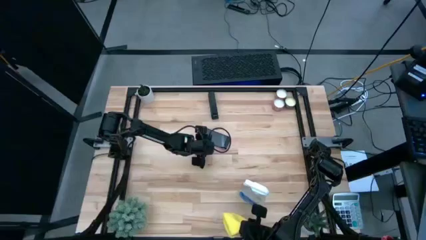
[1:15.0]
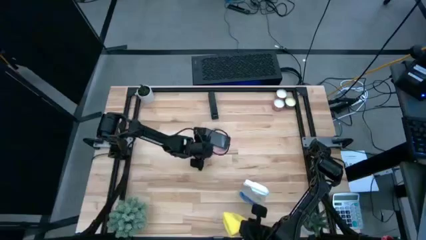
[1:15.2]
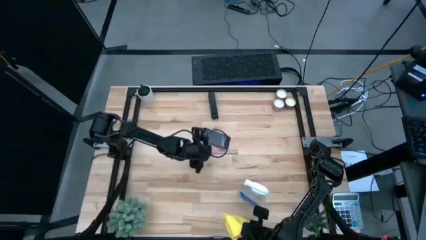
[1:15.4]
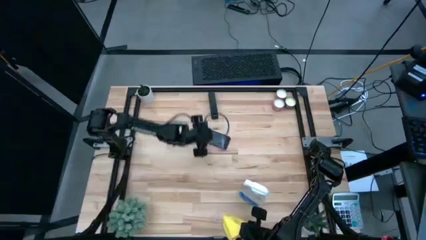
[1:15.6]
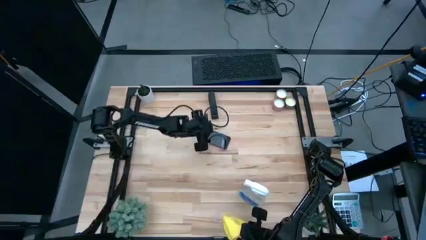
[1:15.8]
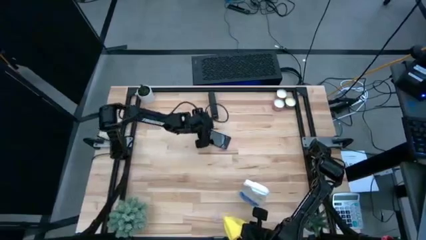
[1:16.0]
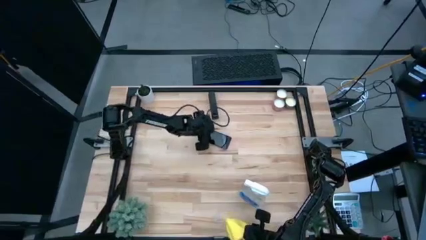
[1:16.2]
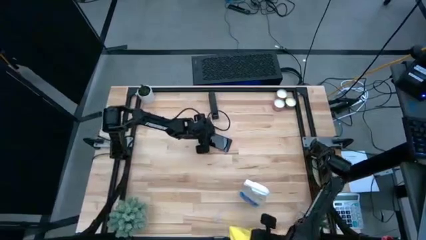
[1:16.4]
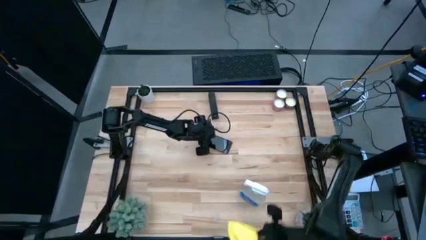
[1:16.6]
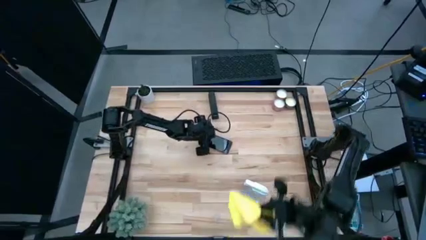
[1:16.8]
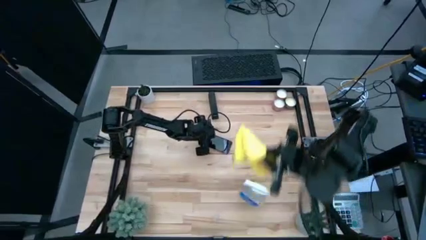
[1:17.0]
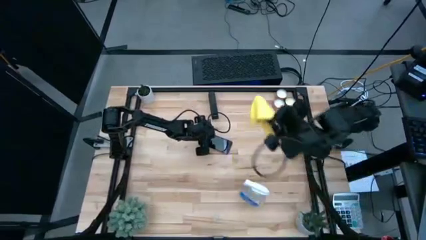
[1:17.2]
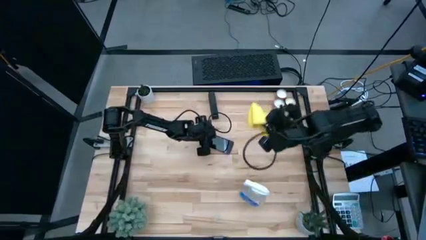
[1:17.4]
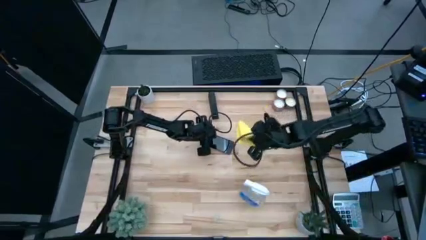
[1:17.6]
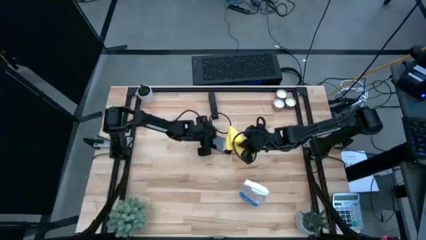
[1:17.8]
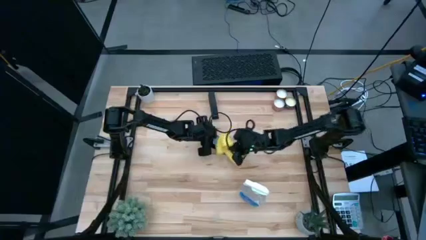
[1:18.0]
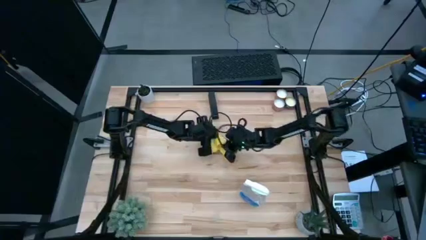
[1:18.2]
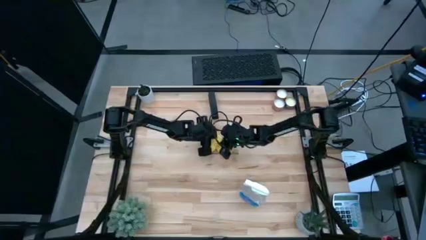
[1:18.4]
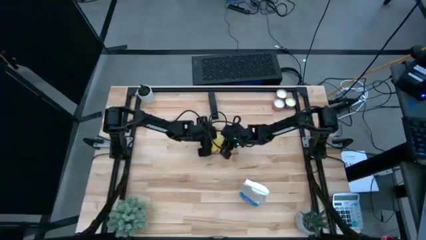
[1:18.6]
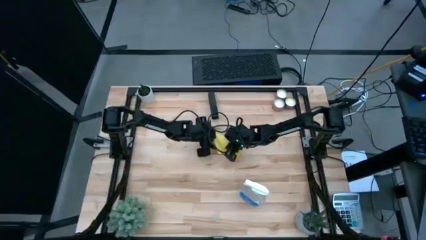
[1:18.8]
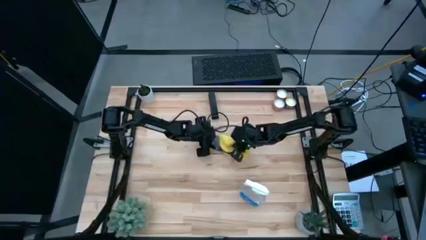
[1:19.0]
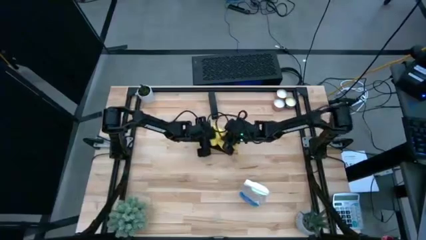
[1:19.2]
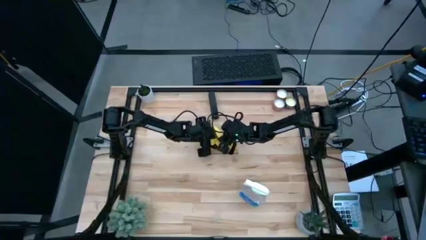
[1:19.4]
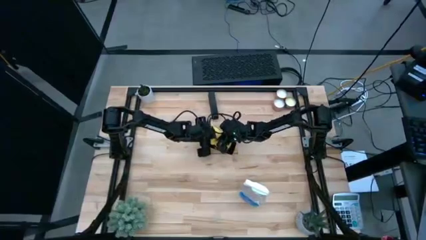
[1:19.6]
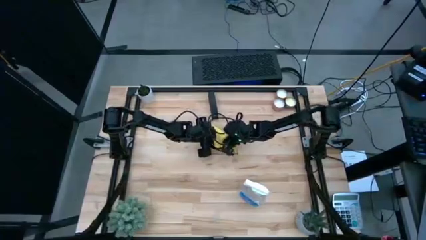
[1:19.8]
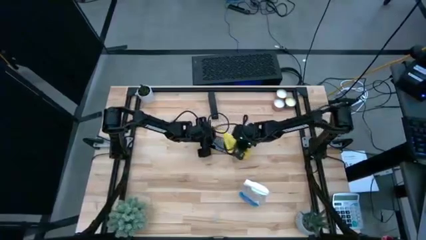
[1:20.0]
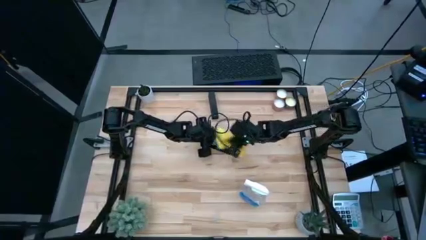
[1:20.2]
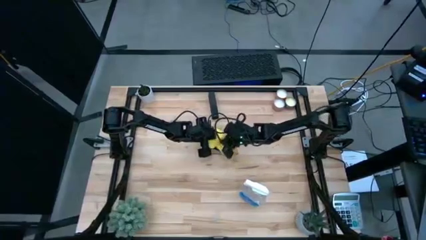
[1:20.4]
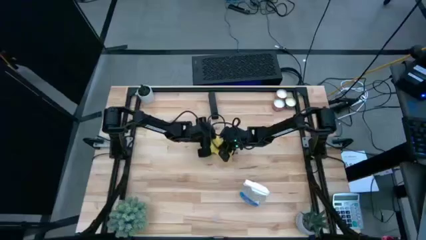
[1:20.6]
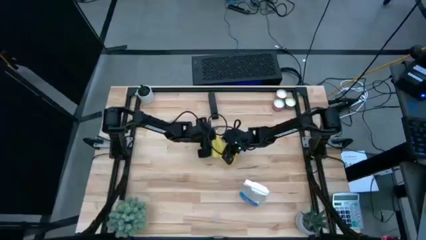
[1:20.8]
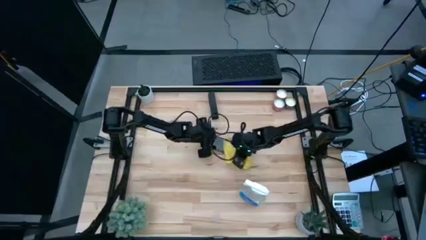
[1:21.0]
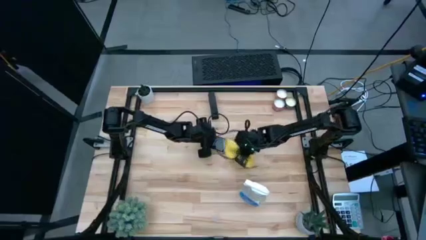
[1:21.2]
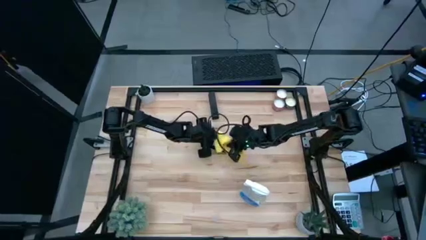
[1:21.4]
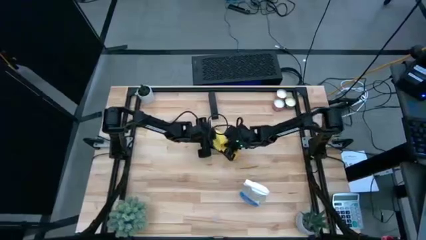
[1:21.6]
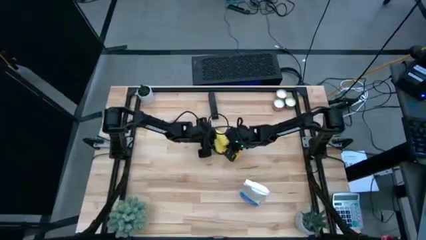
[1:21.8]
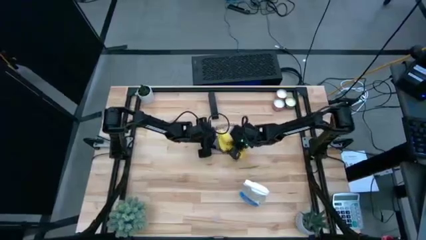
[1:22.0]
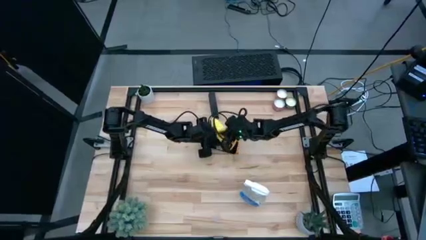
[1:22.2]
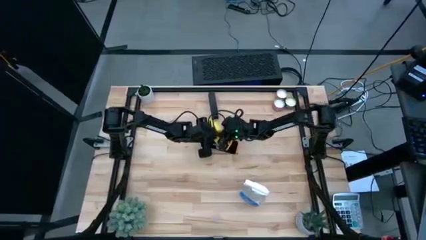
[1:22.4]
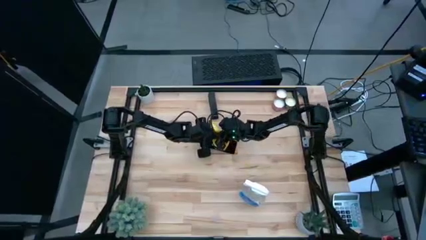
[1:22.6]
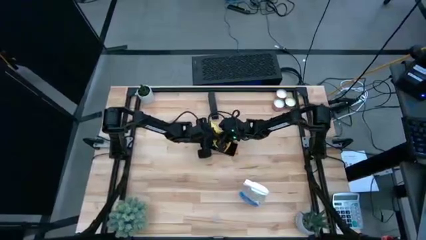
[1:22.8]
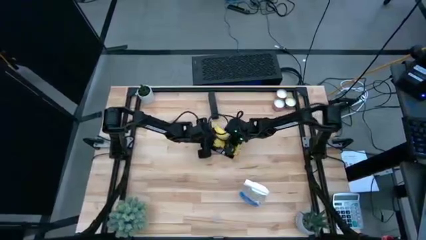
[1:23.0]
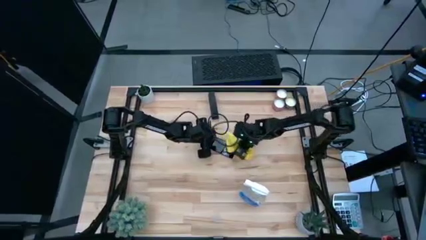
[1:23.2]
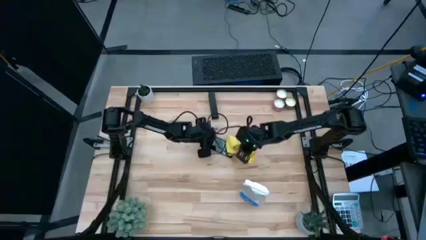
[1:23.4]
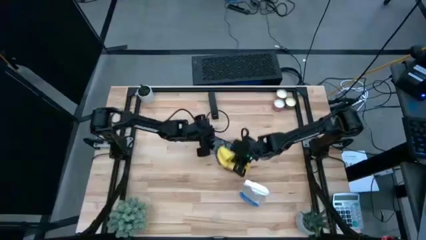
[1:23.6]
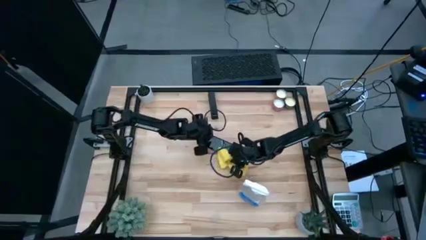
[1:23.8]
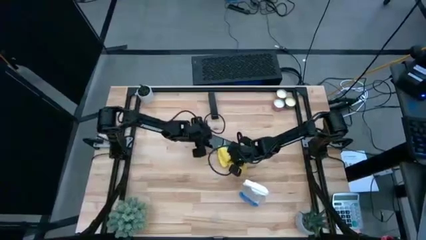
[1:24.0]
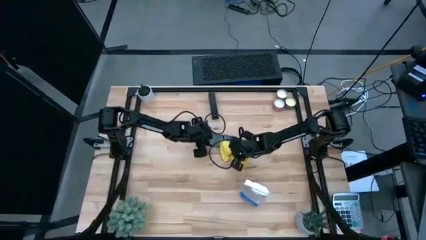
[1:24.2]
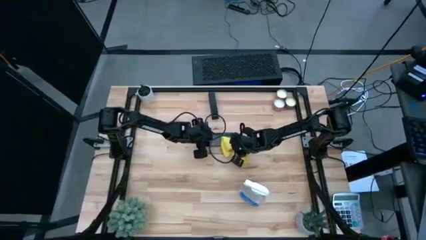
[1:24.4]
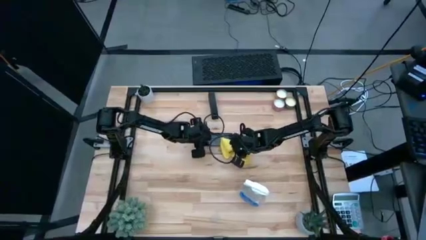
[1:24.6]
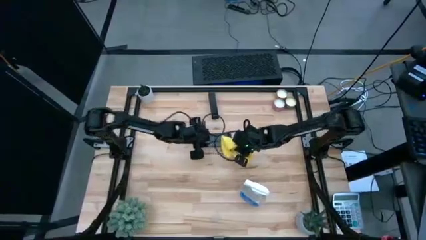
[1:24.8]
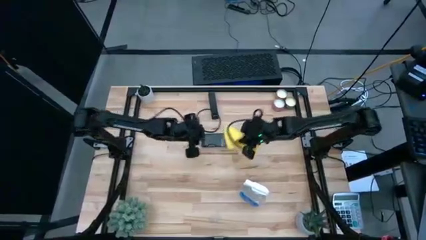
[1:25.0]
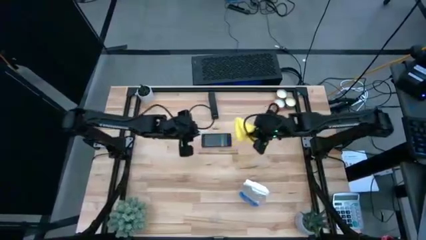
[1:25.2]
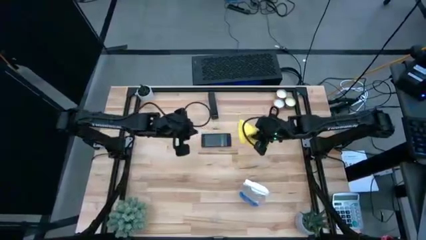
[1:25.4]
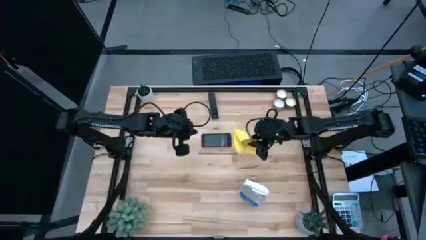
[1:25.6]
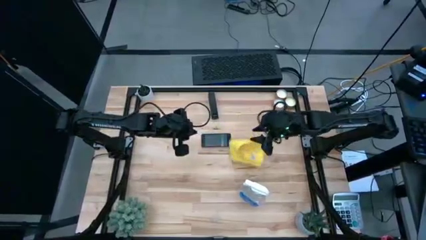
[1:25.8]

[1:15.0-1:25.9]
Task: Apply microfiber cloth
Wipe the front of the pink cellphone with a yellow microfiber cloth

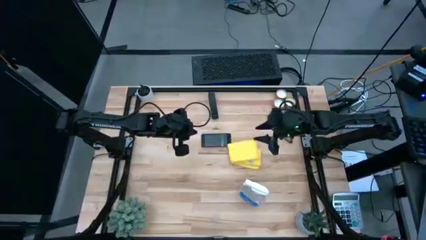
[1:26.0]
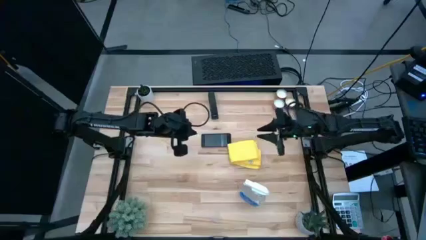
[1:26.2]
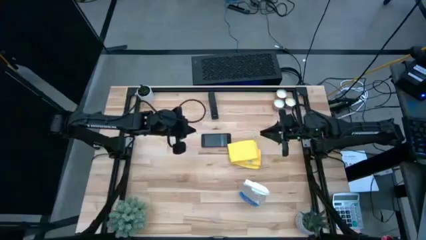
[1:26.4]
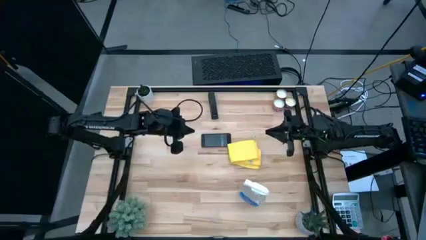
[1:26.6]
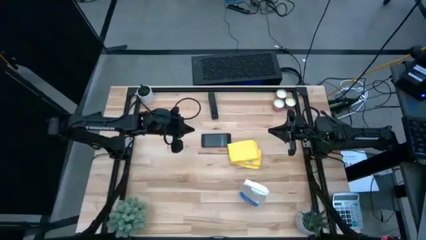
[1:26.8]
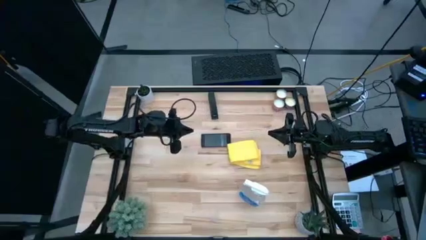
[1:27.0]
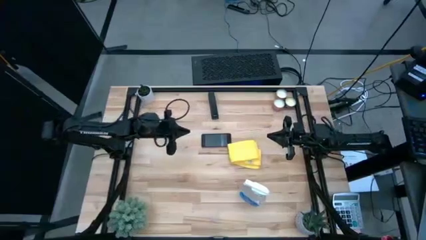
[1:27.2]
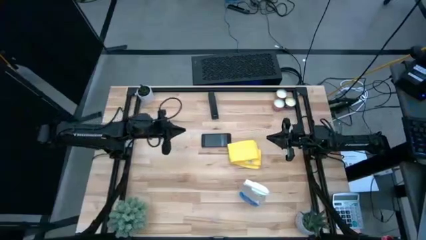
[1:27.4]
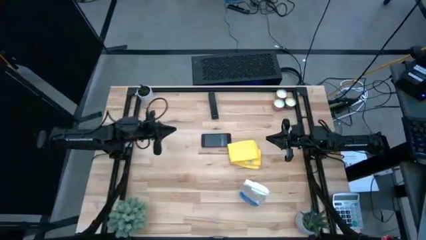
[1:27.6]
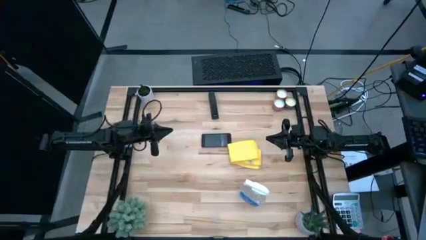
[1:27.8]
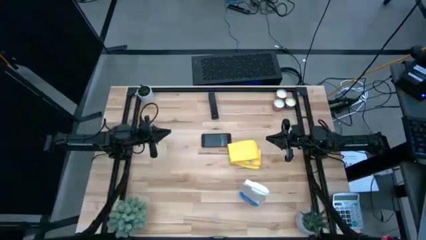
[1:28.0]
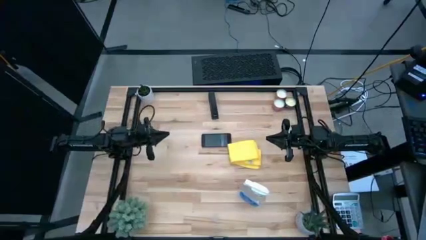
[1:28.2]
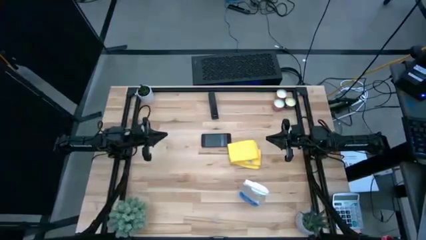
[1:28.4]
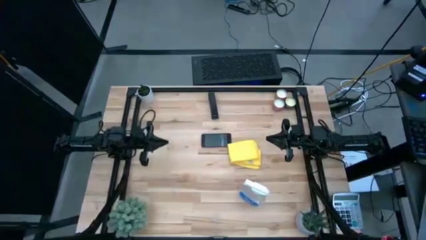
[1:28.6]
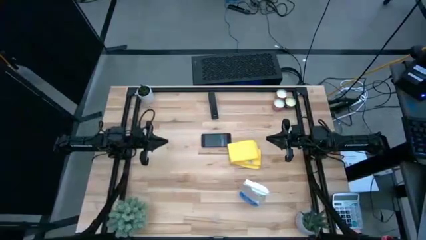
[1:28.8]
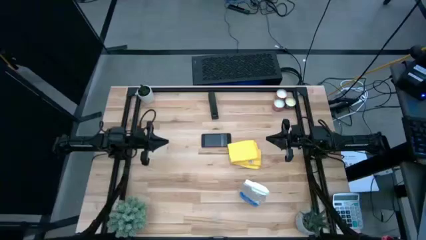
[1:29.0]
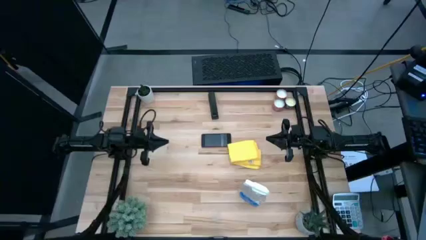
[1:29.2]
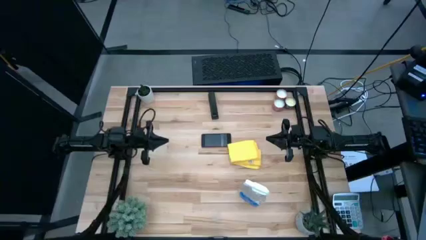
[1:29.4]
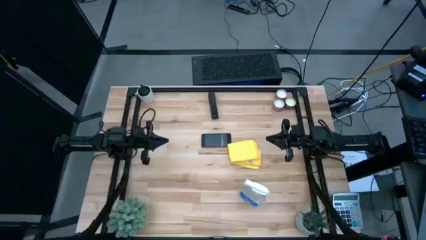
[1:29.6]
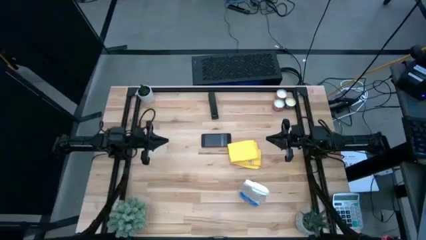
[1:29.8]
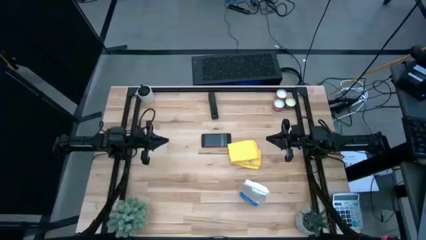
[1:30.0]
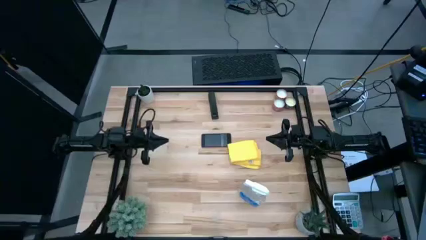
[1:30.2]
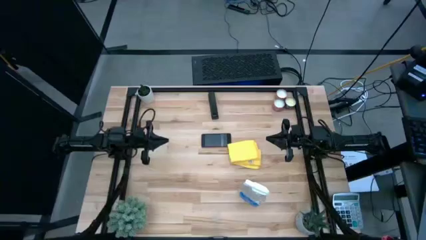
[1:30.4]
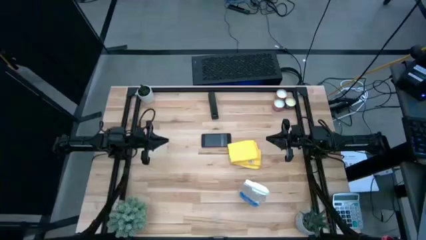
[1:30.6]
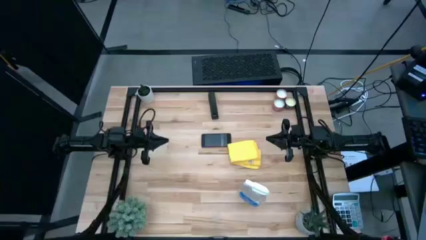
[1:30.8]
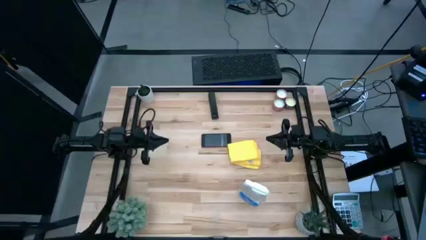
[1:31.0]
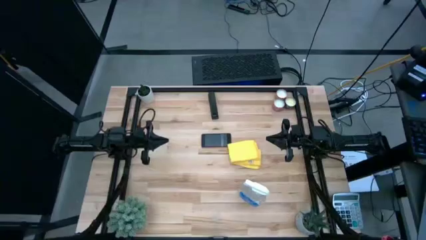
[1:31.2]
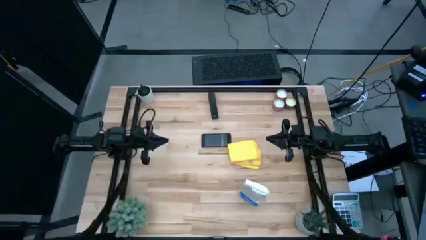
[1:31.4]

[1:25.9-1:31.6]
Return to Home Position
